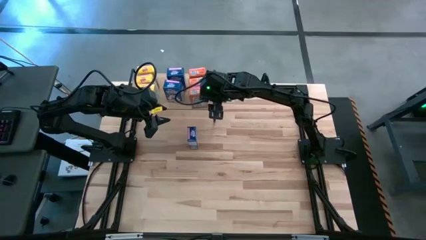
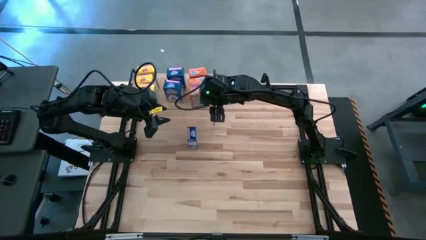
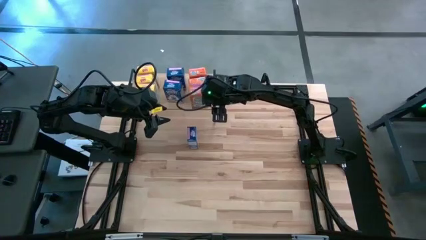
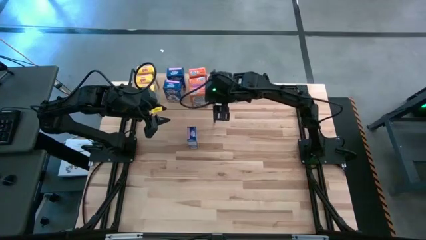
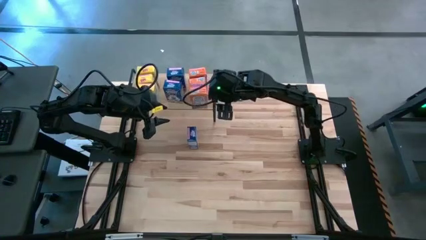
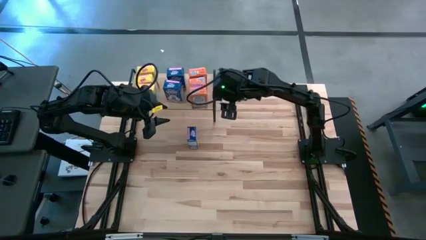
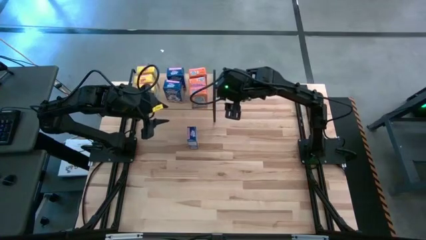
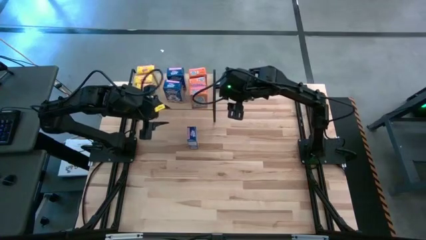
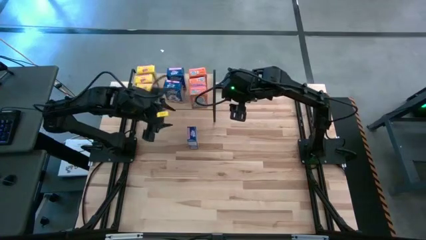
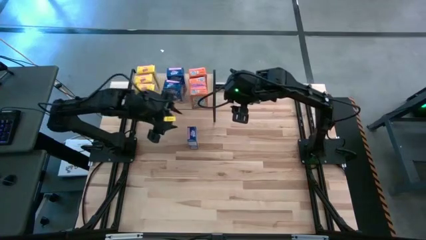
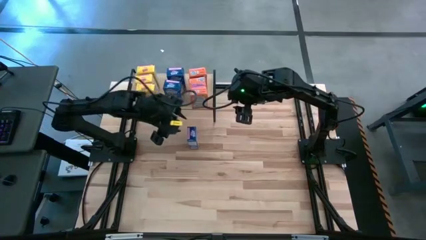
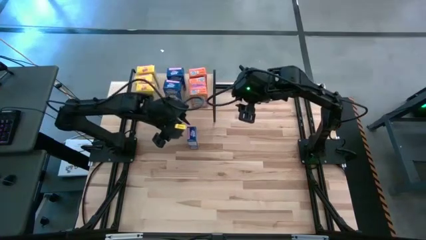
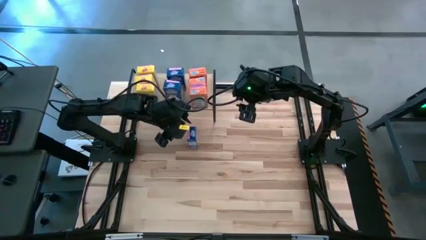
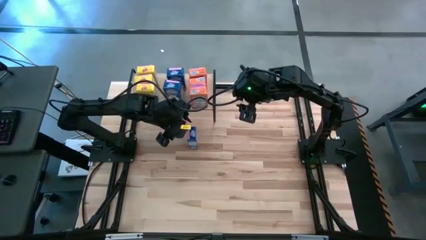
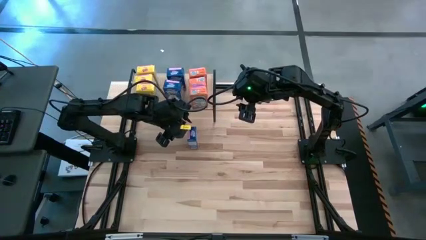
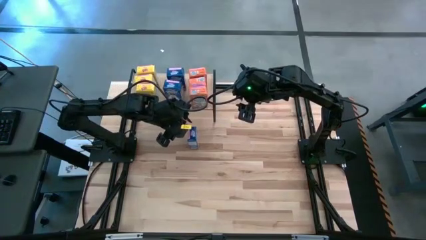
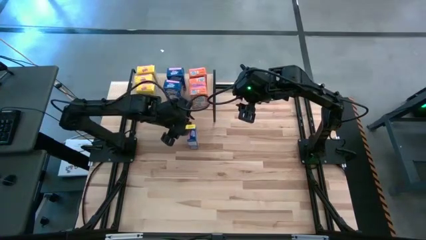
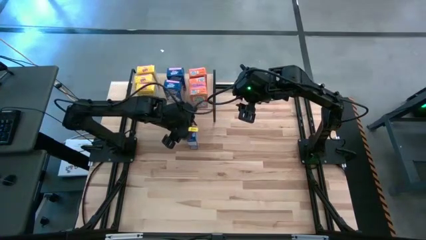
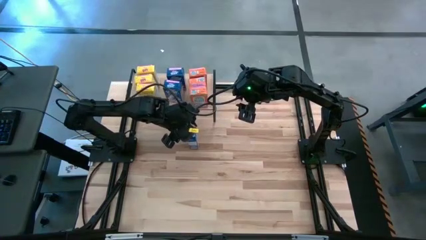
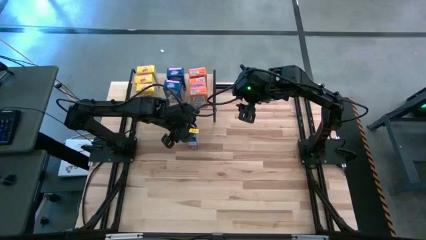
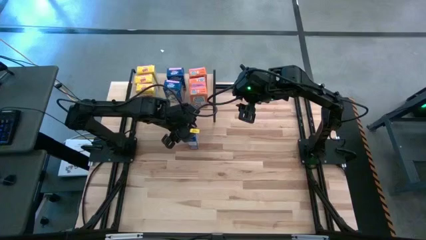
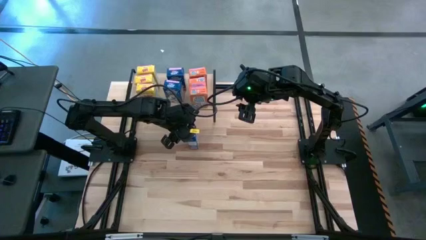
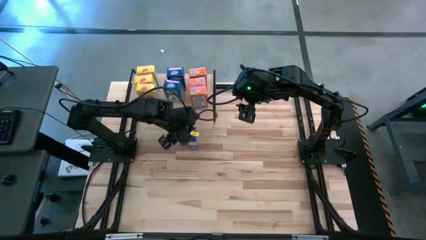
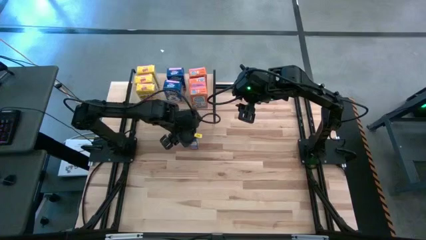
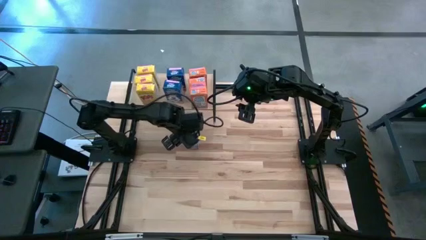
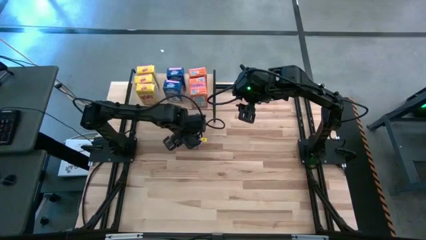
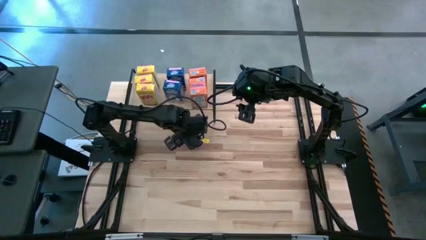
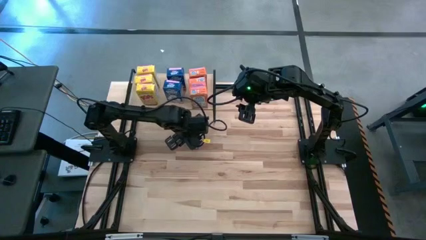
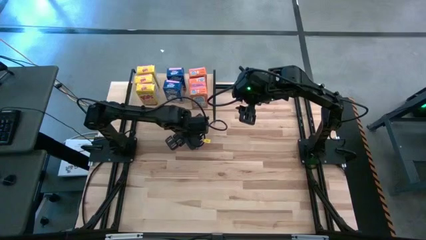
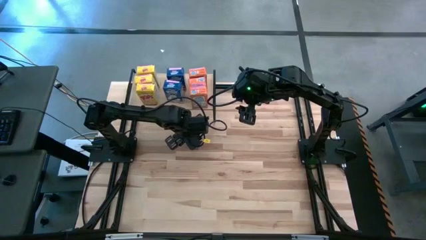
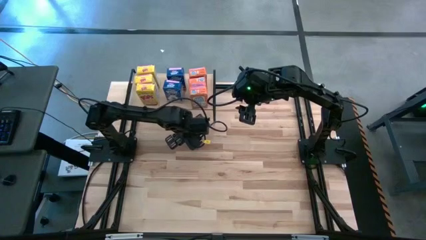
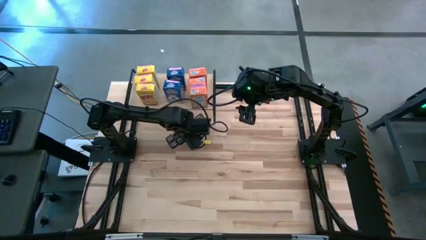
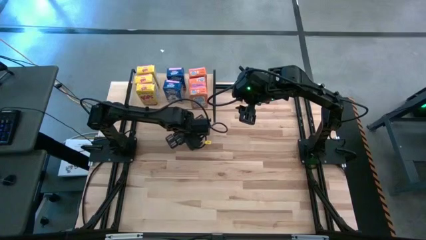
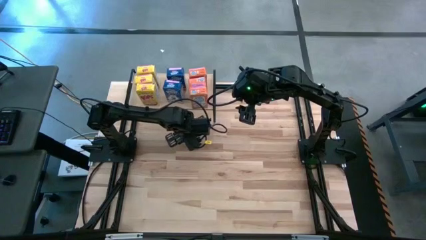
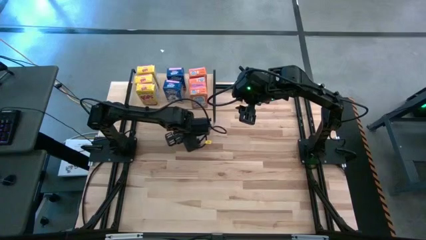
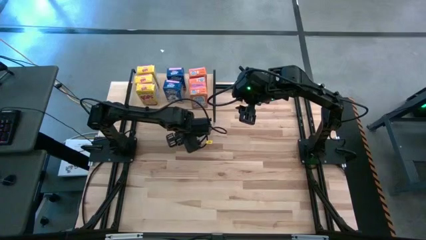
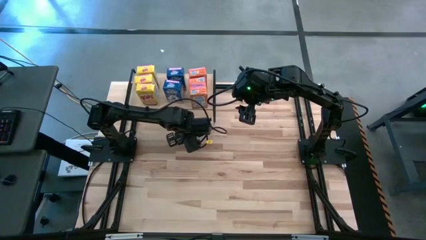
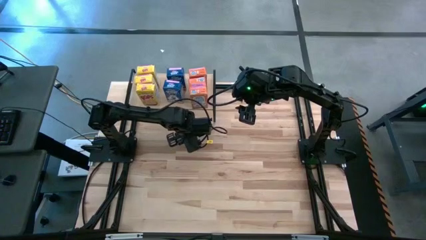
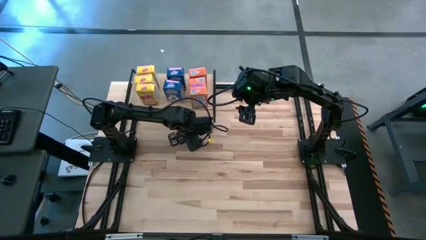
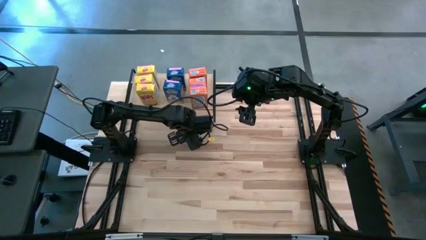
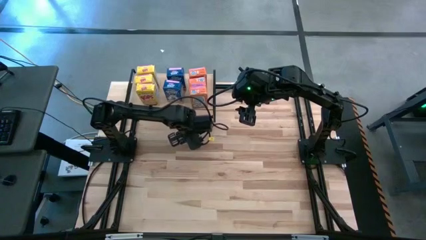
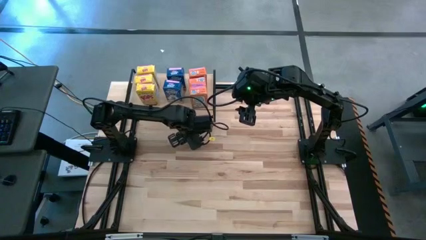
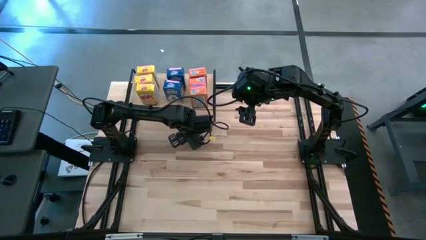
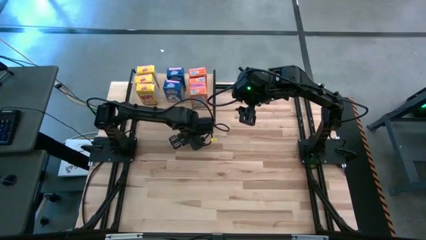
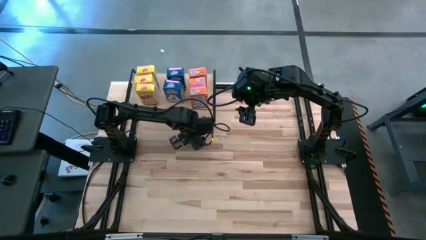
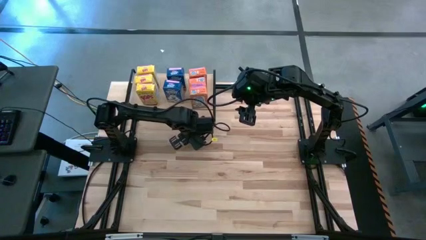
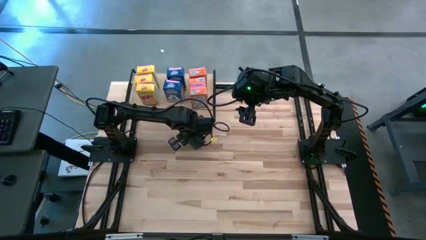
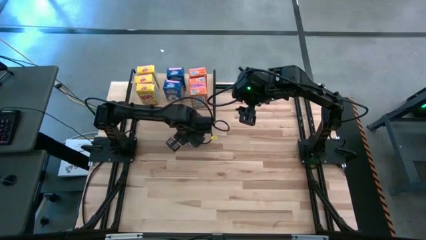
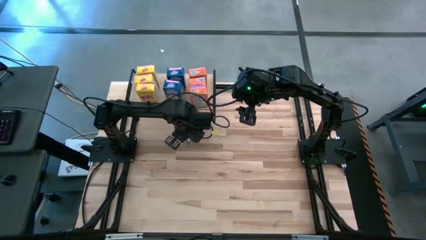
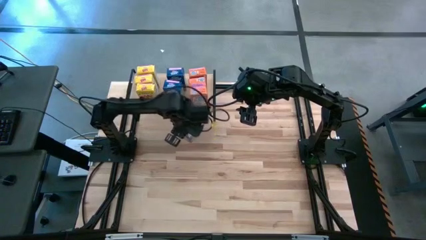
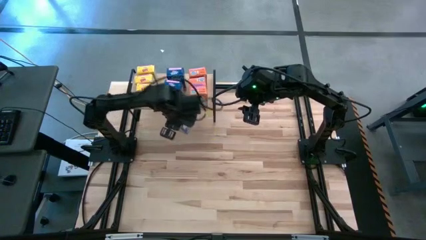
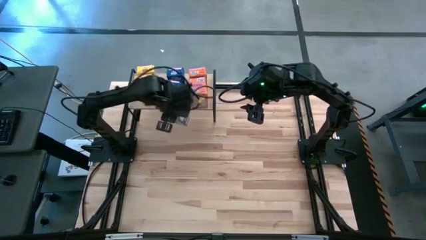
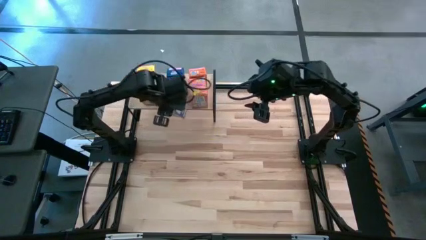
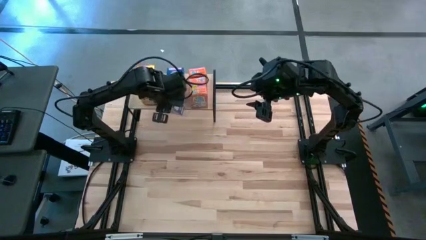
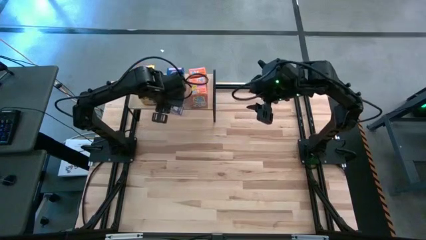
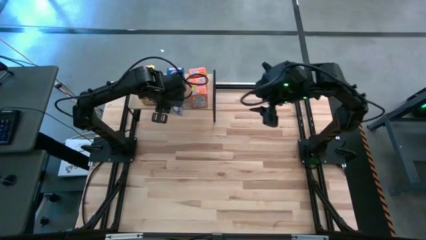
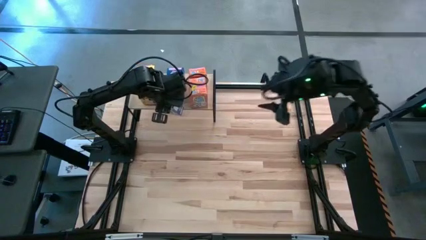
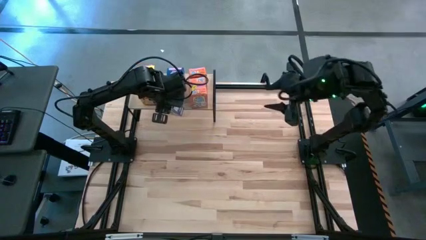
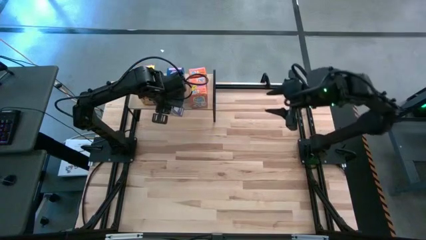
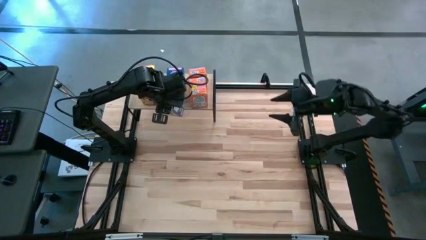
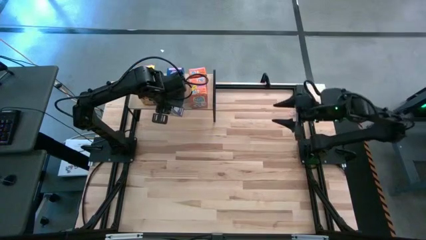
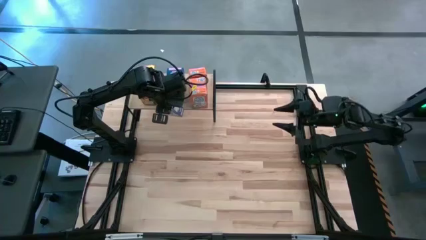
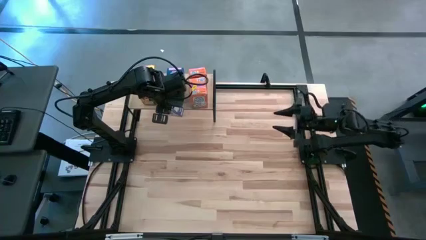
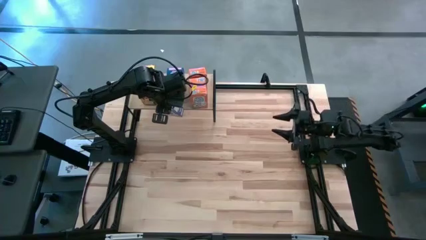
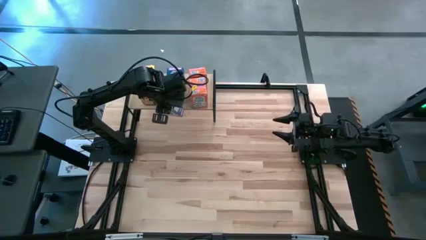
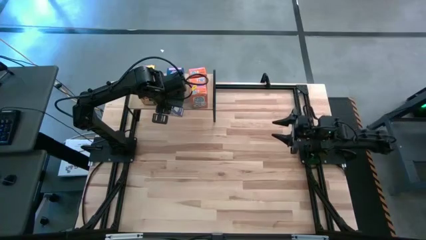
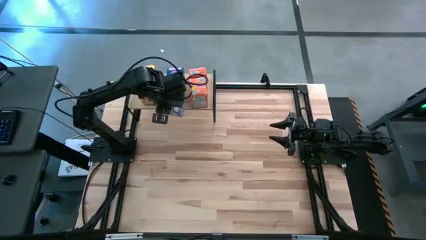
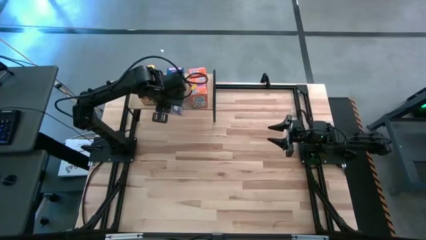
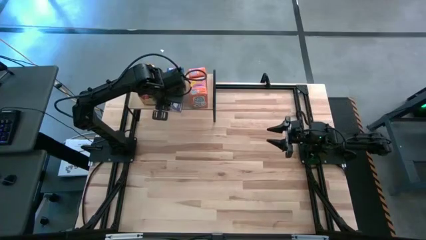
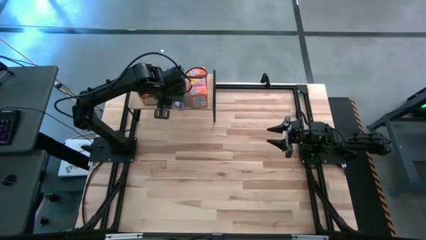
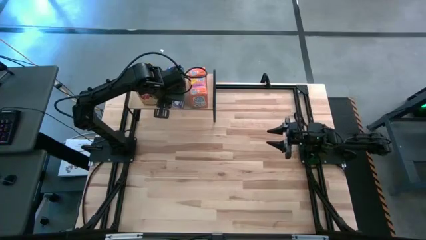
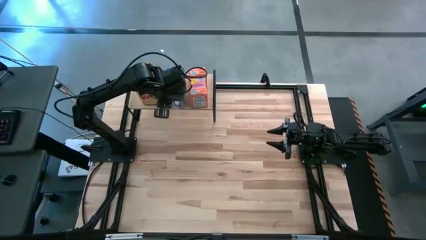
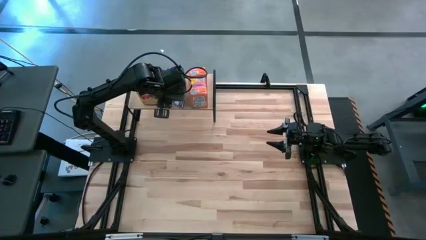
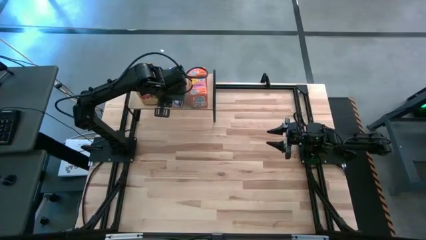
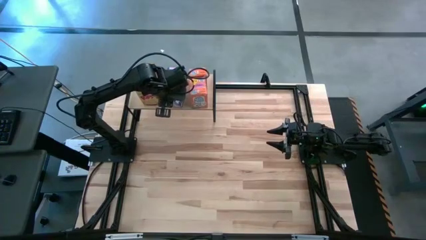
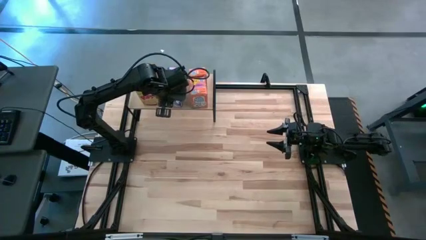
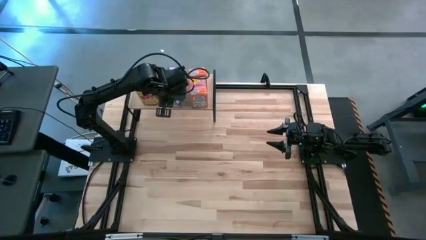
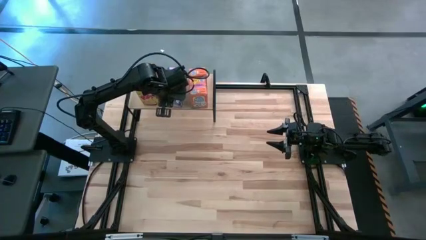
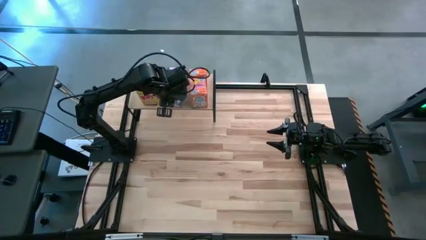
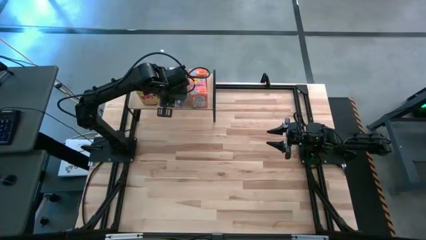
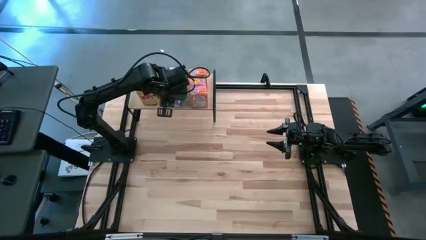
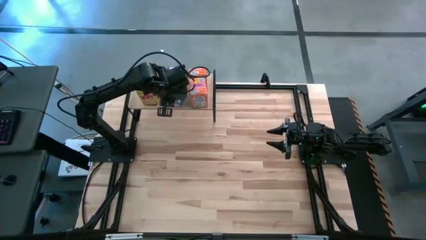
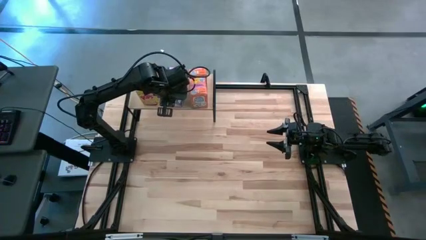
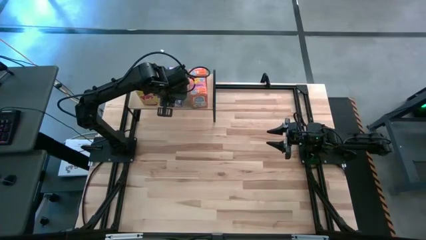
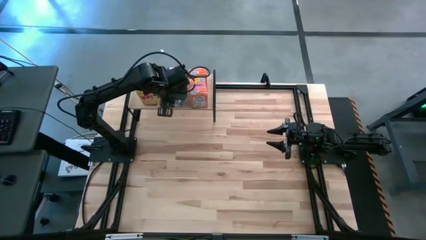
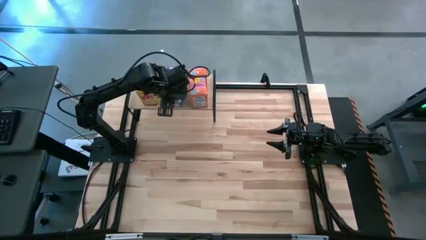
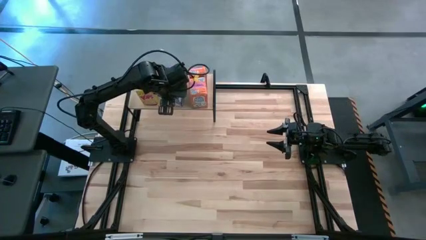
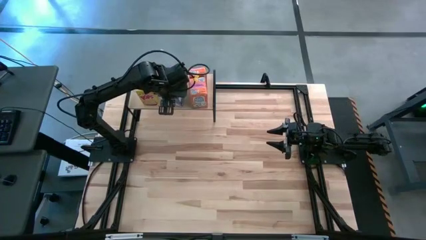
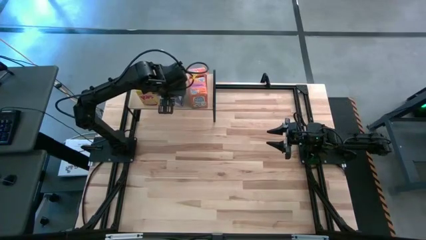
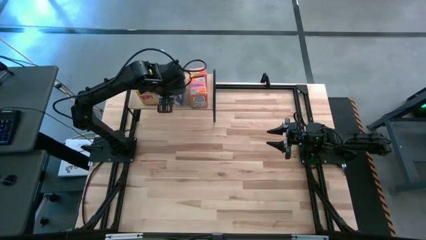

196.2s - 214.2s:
Task: Stack cereal on shelf
Put the blue cereal box on the shelf aligned with the other blue cereal boxes
